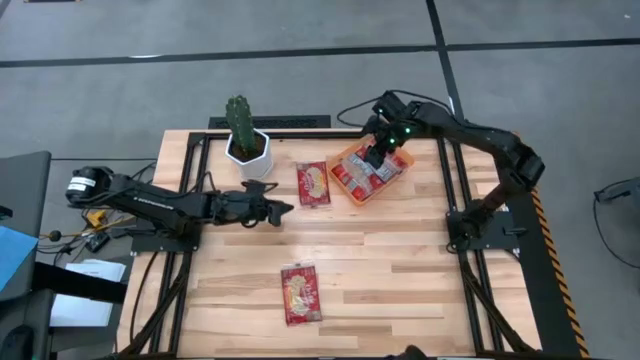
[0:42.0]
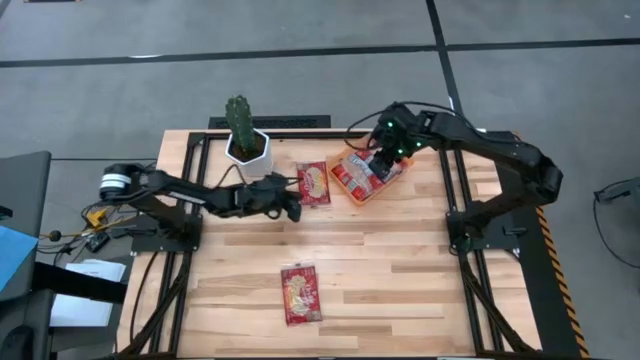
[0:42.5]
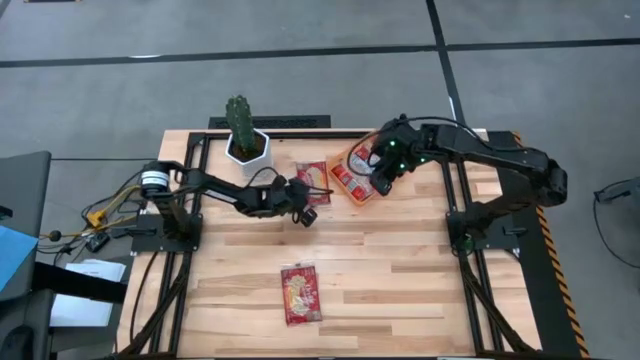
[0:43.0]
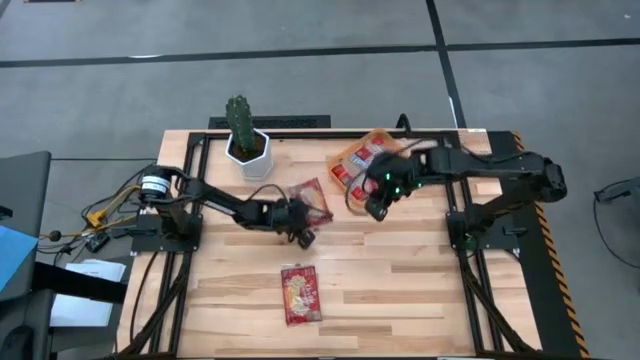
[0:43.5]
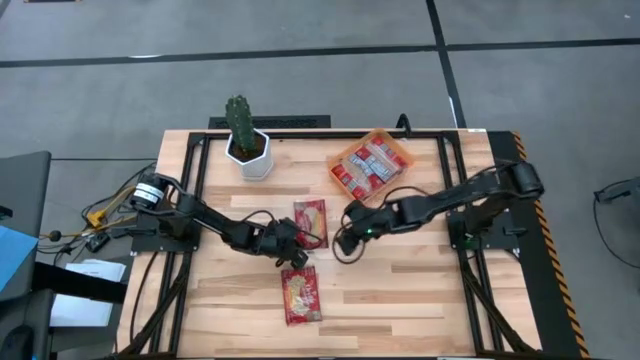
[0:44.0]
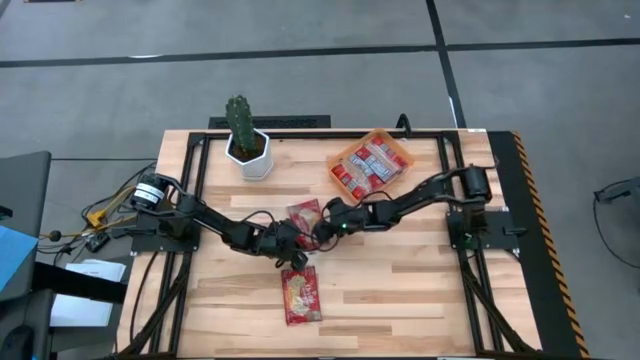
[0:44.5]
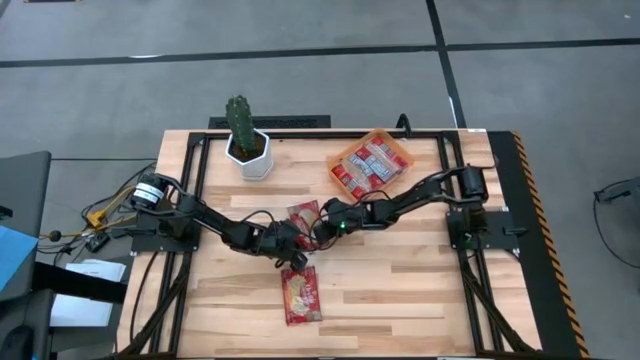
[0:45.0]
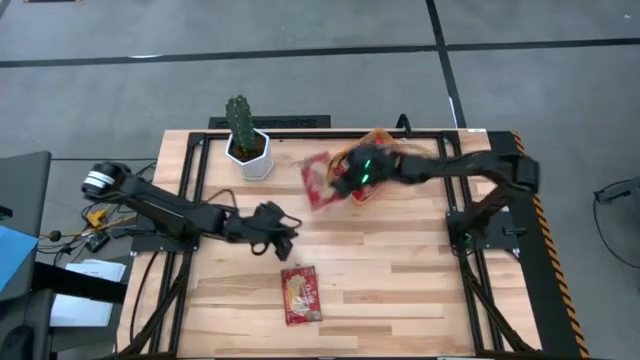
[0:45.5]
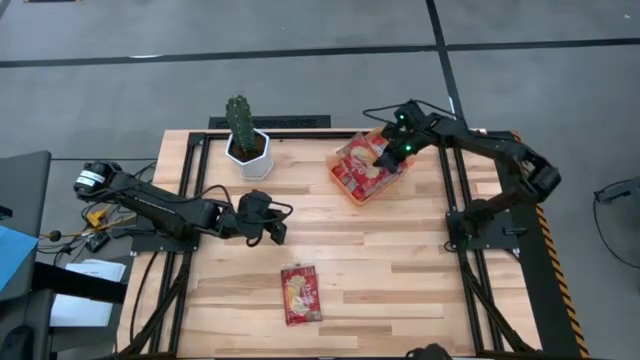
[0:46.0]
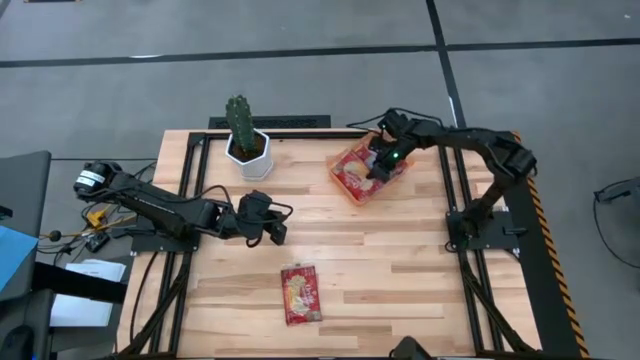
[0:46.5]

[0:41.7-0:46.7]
Task: Sort popcorn bags into baskets
Put the popcorn bag into the orange bin

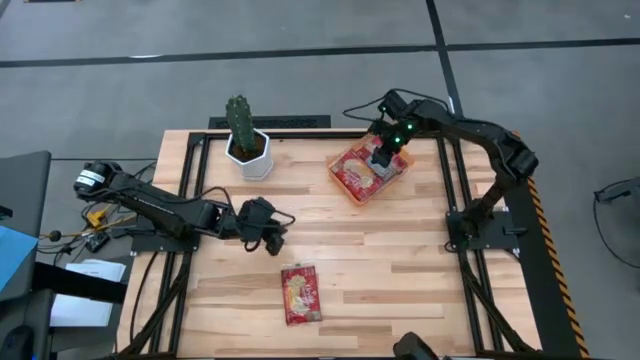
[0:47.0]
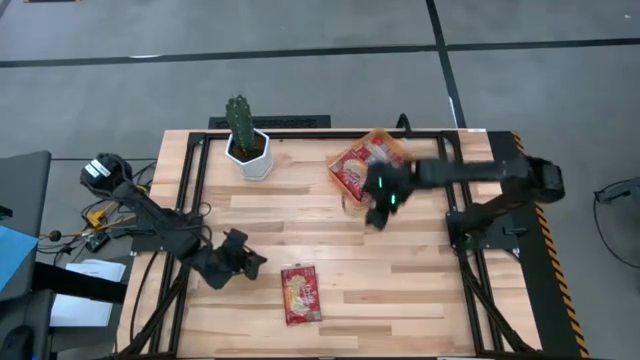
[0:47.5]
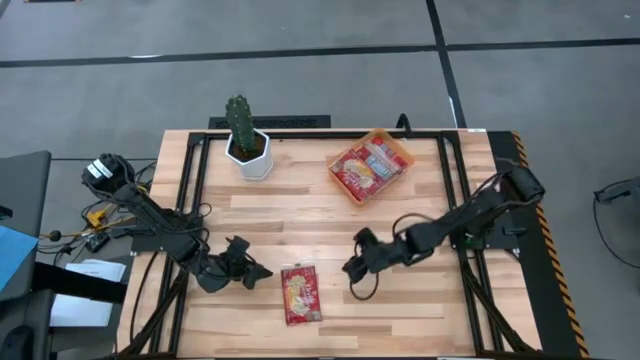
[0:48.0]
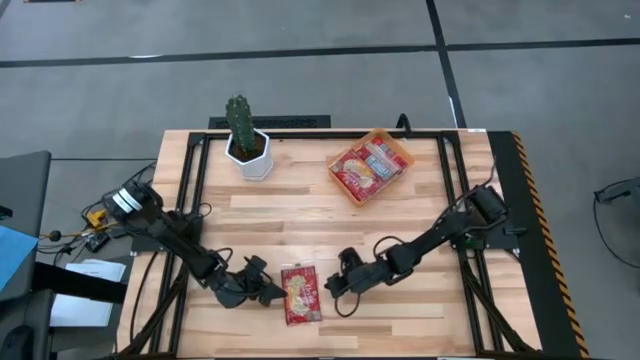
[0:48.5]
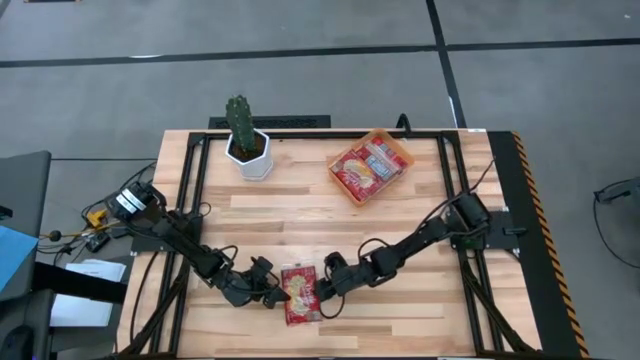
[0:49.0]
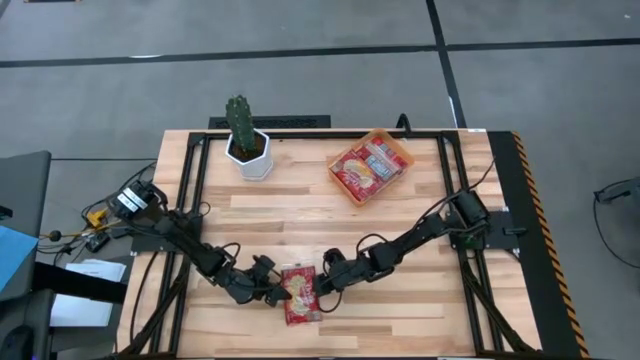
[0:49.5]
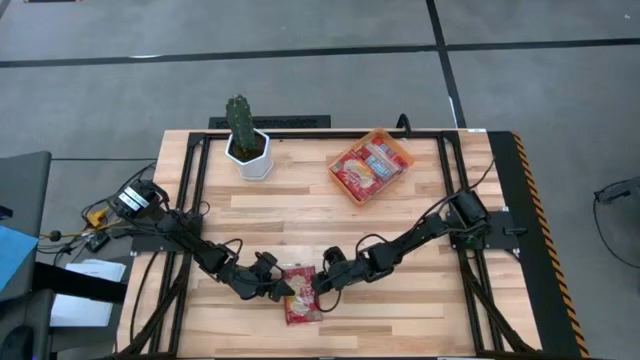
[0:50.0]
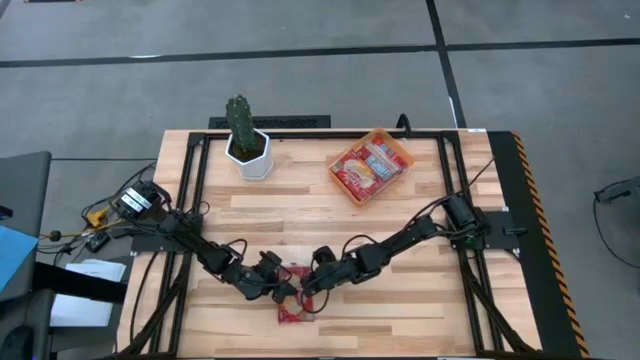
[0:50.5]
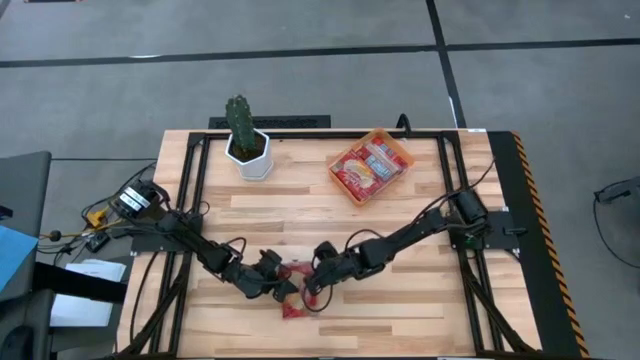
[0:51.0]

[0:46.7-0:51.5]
Put the popcorn bag into the orange bin

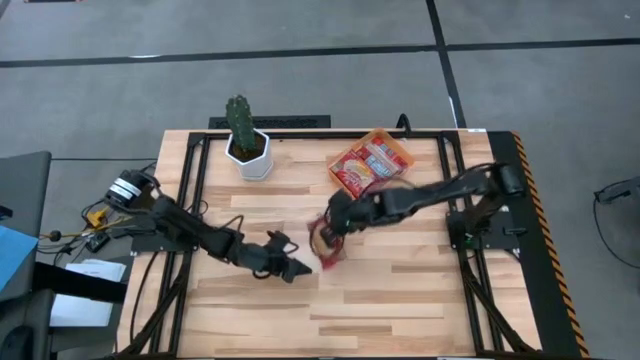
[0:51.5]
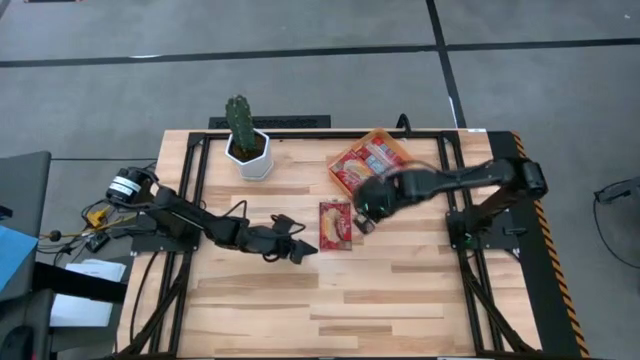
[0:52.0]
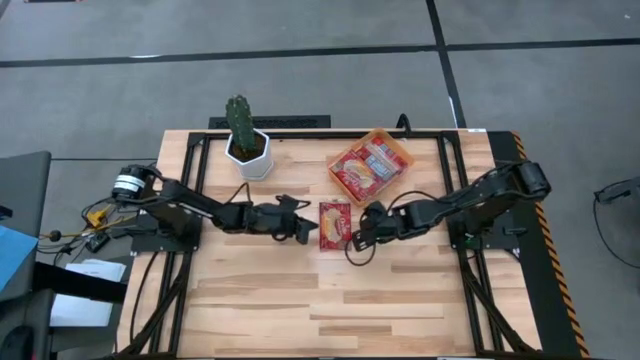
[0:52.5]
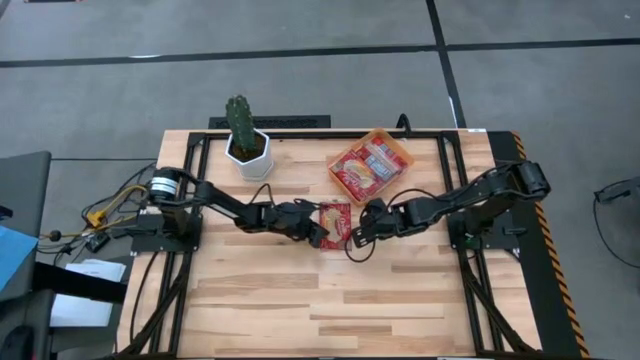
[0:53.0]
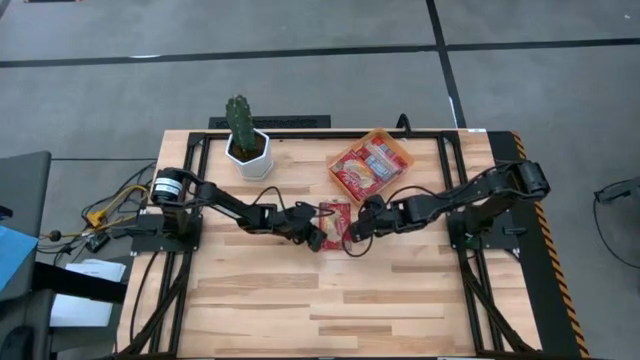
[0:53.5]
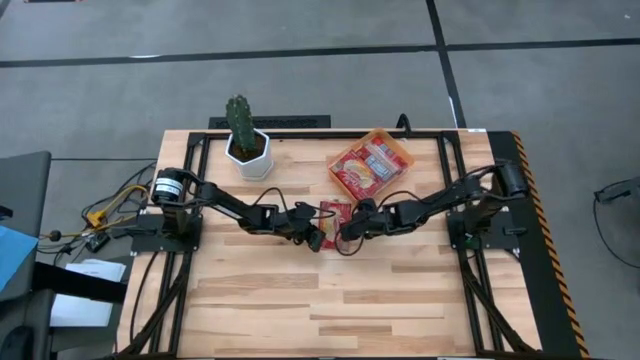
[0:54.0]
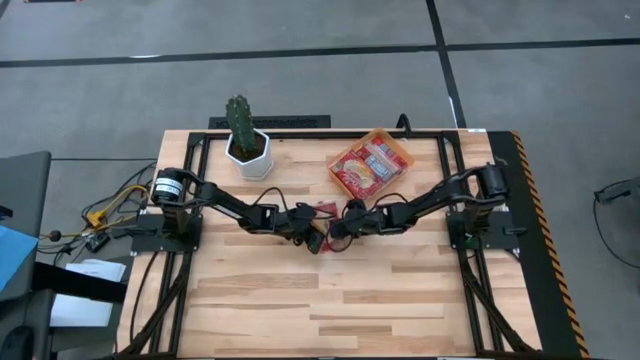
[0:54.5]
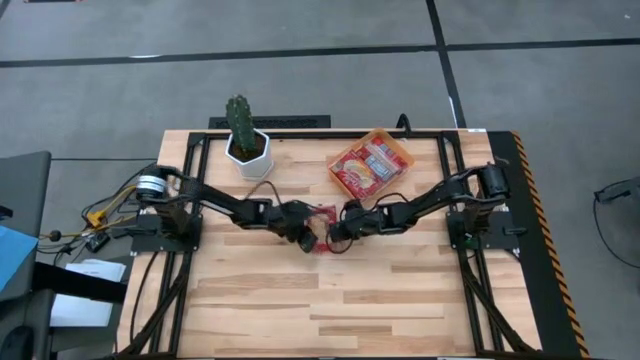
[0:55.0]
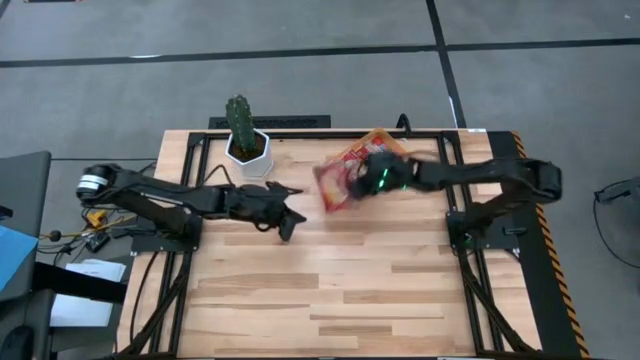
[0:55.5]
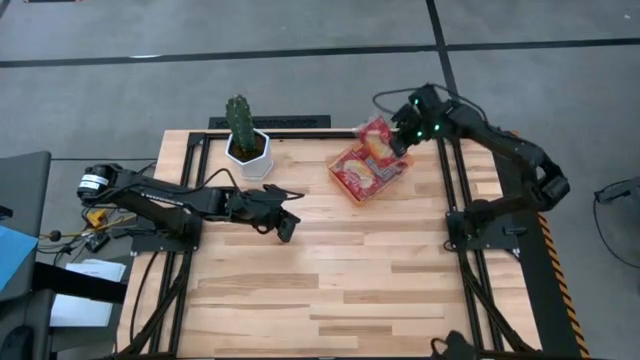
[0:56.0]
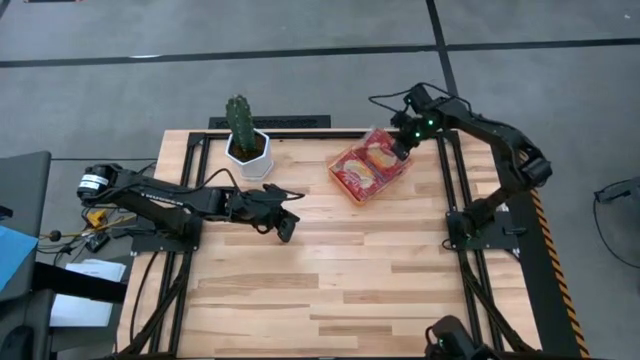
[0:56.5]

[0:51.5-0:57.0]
Put the popcorn bag into the orange bin

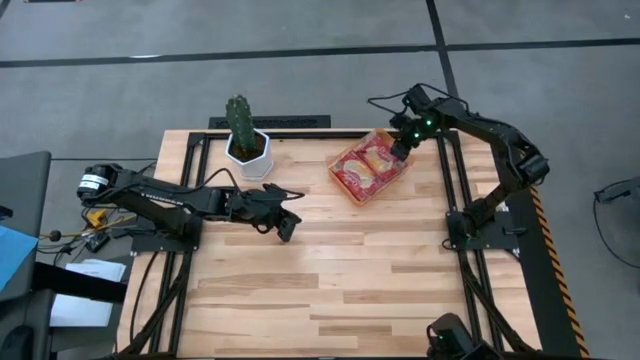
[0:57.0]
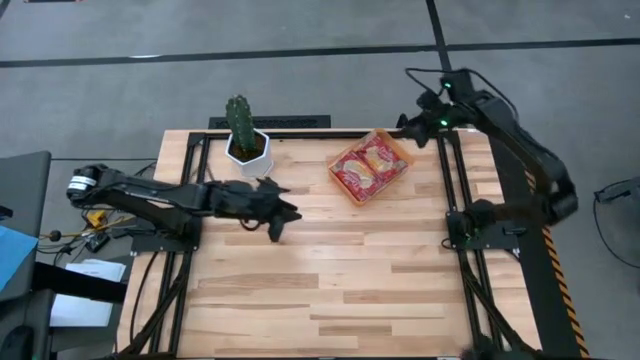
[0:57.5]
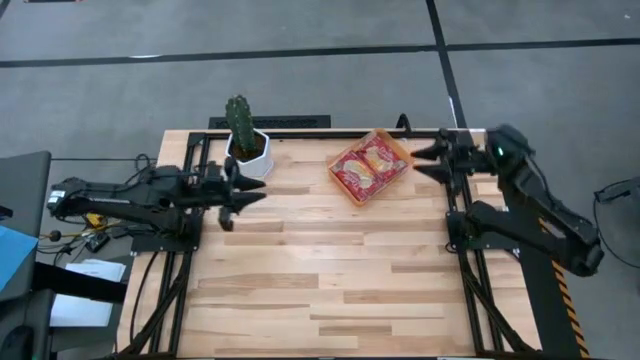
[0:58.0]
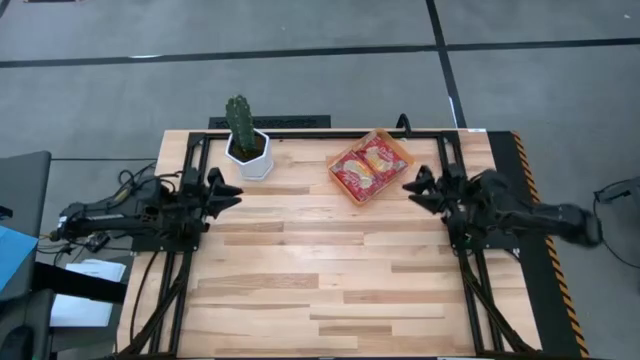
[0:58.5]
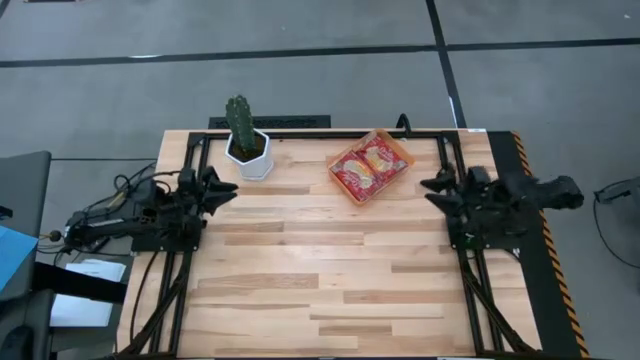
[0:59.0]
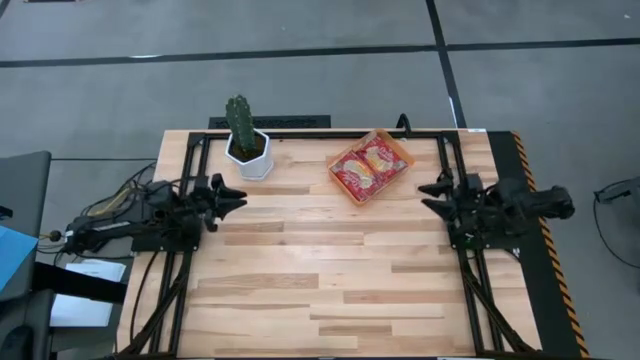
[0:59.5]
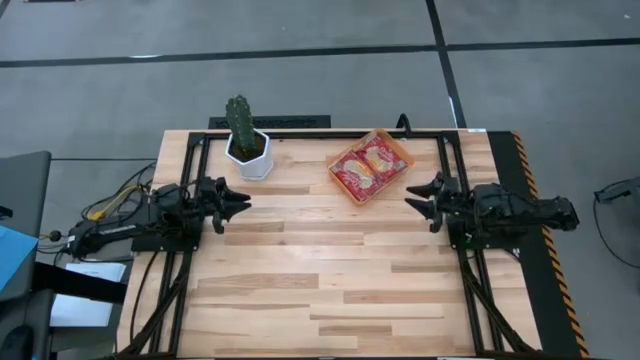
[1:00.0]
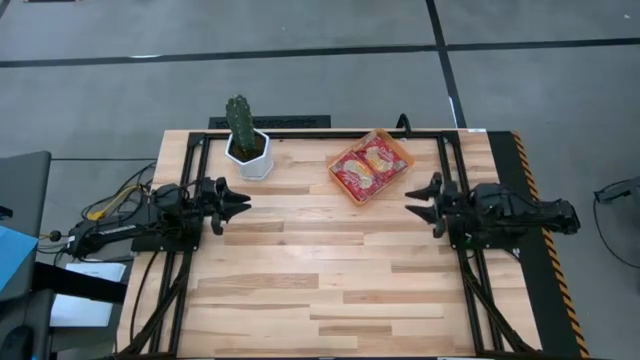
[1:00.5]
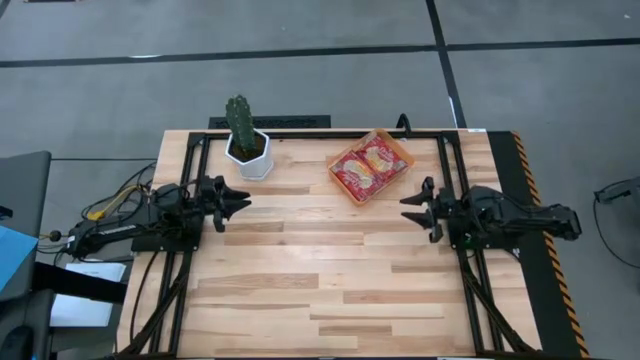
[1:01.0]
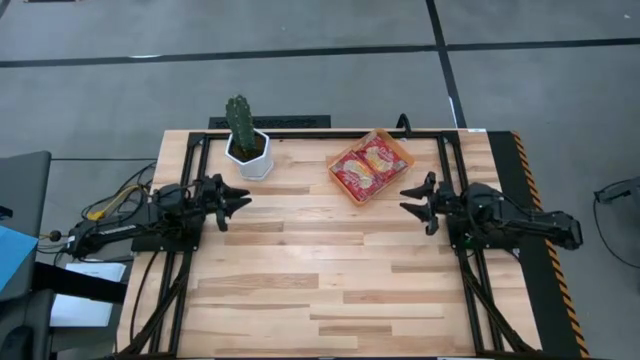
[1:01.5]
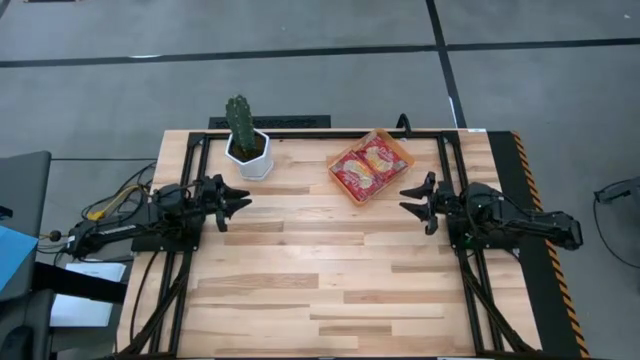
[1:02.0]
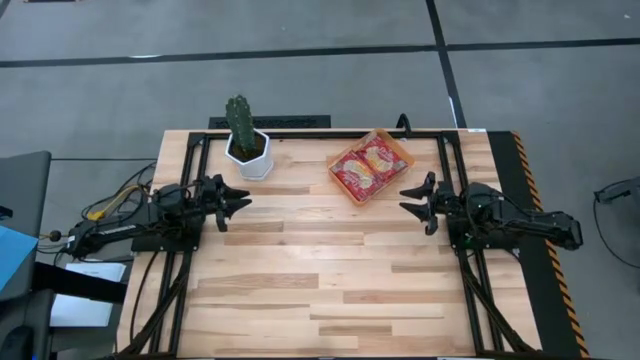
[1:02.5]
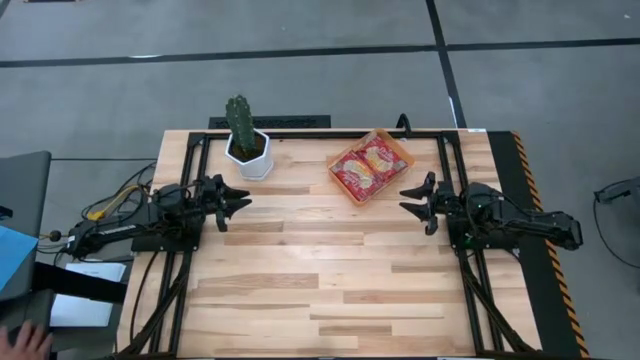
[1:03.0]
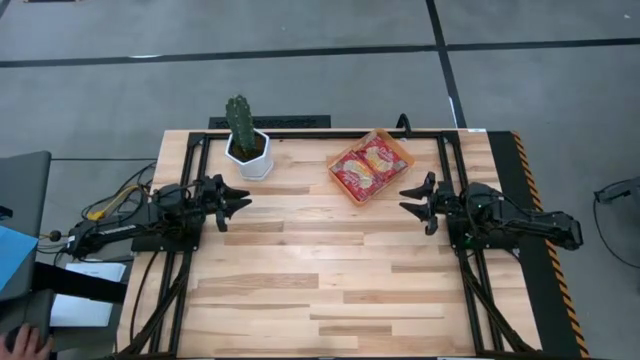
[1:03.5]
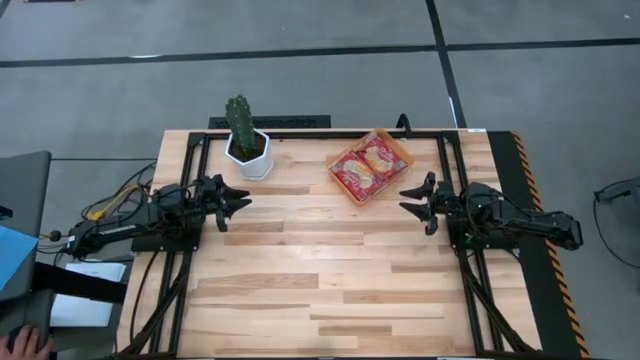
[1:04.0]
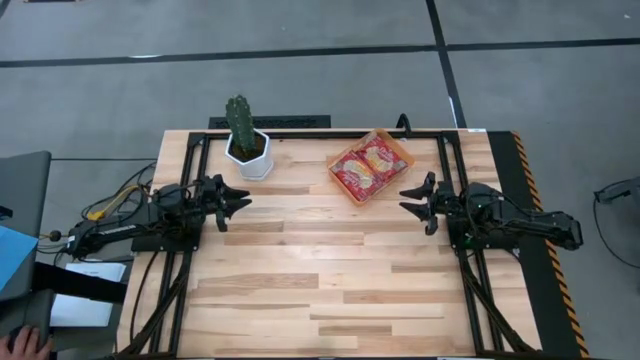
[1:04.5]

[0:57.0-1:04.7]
Return to Home Position
